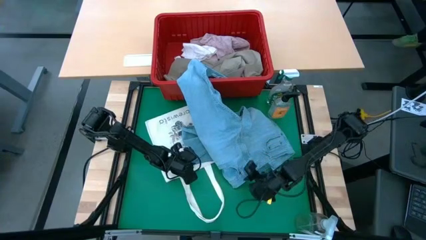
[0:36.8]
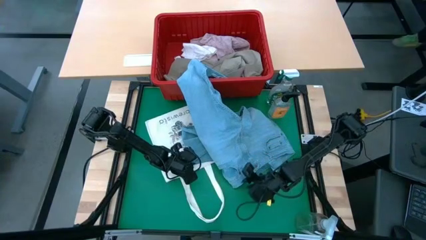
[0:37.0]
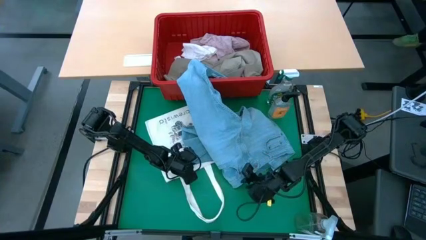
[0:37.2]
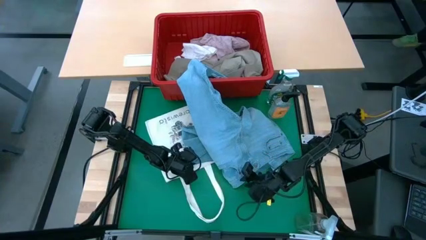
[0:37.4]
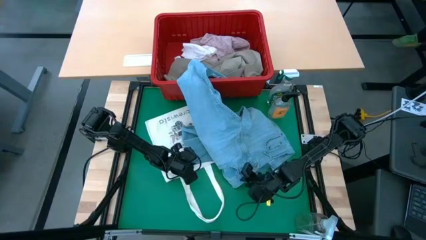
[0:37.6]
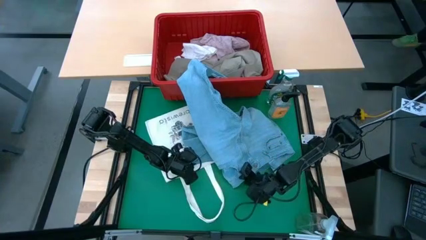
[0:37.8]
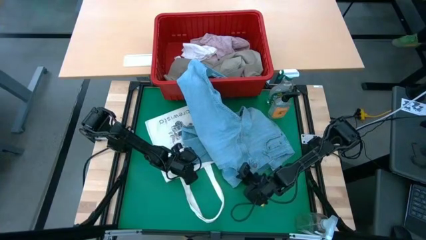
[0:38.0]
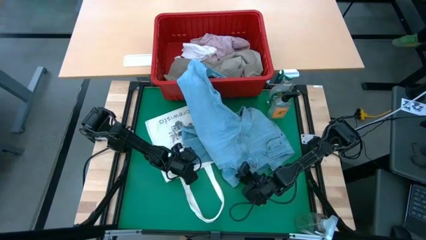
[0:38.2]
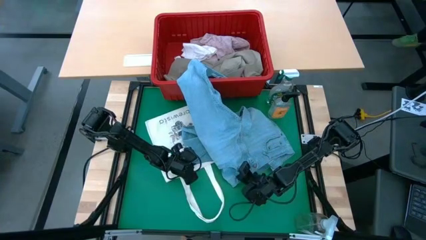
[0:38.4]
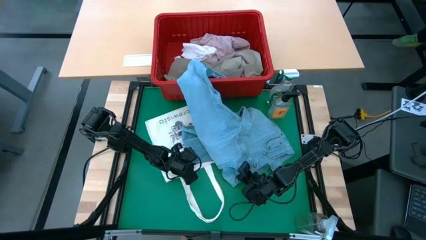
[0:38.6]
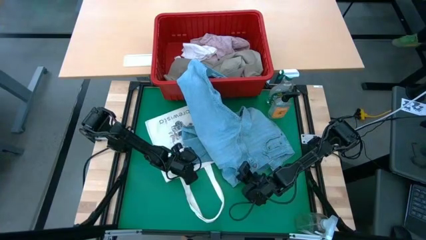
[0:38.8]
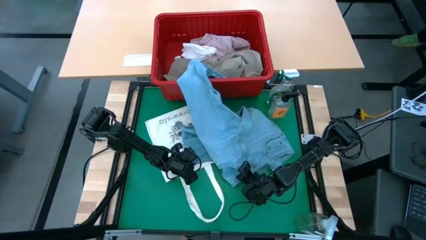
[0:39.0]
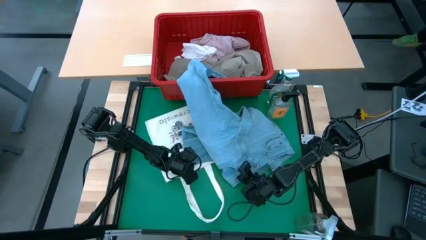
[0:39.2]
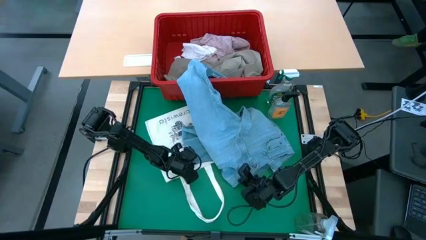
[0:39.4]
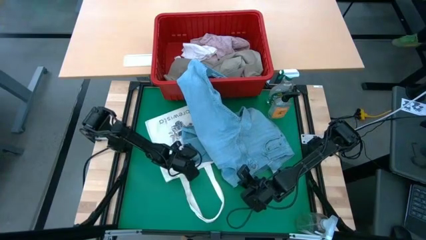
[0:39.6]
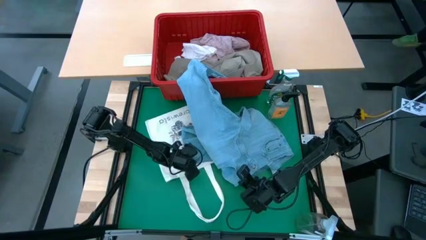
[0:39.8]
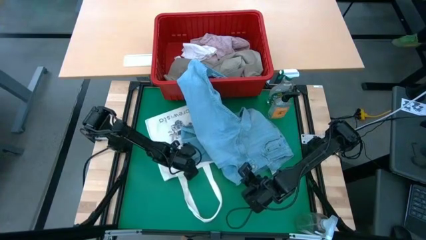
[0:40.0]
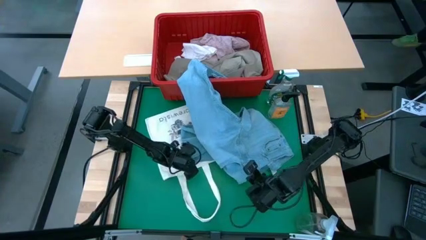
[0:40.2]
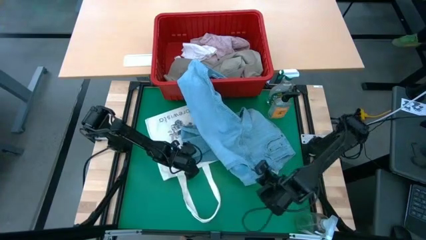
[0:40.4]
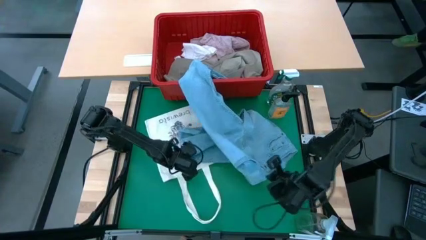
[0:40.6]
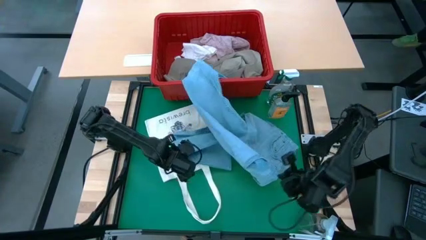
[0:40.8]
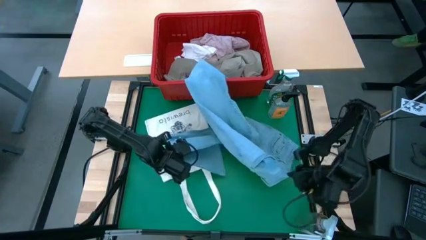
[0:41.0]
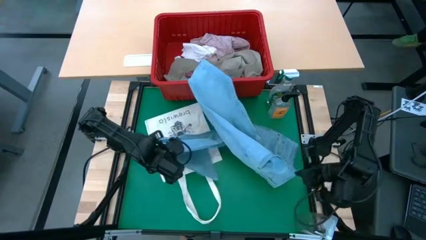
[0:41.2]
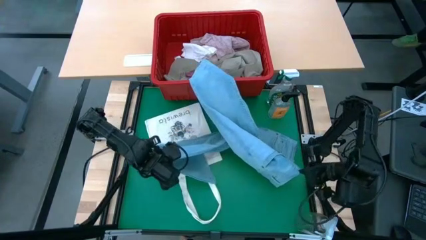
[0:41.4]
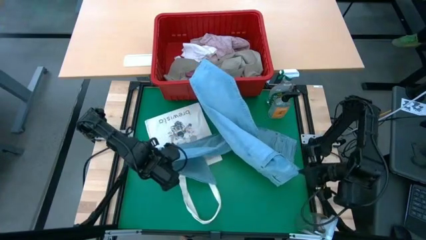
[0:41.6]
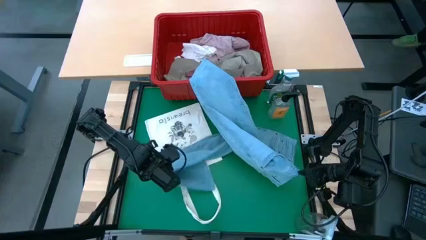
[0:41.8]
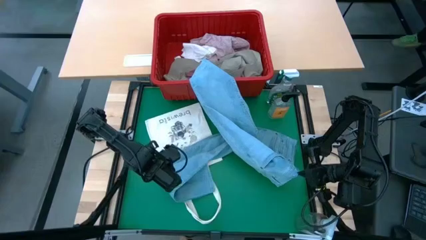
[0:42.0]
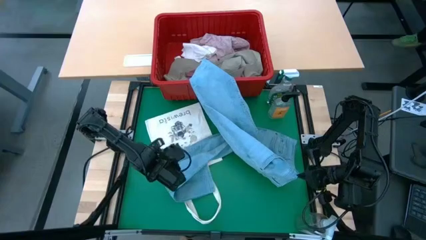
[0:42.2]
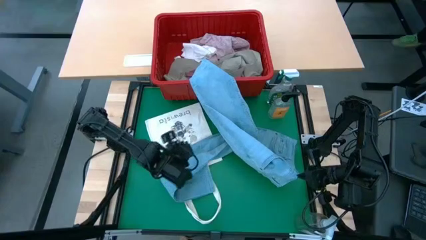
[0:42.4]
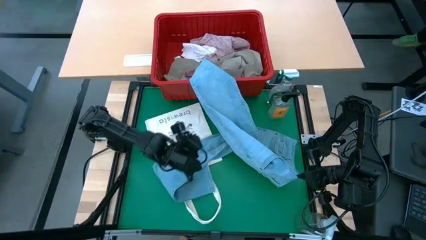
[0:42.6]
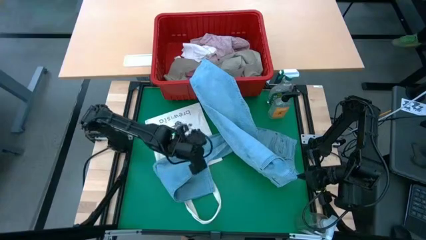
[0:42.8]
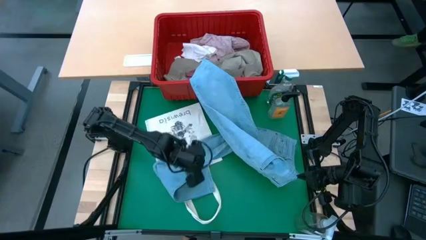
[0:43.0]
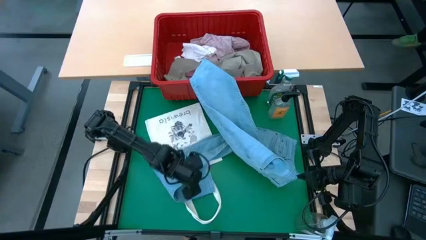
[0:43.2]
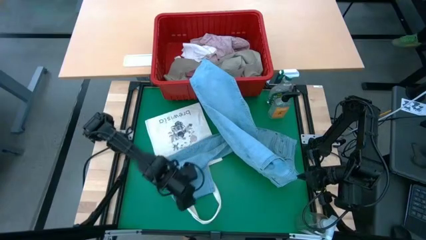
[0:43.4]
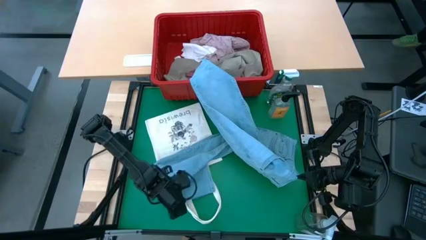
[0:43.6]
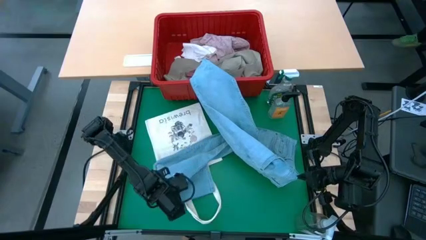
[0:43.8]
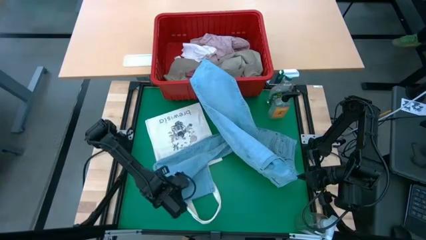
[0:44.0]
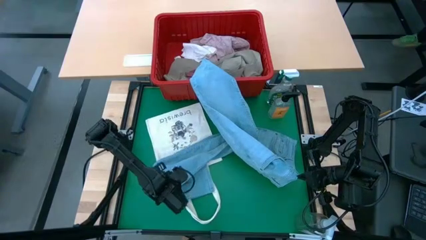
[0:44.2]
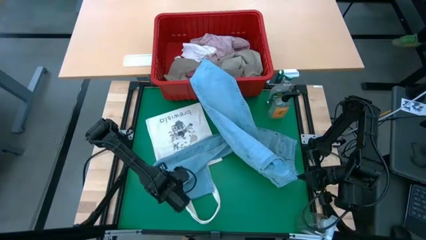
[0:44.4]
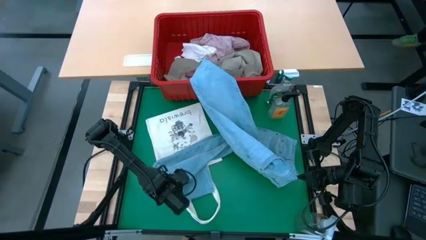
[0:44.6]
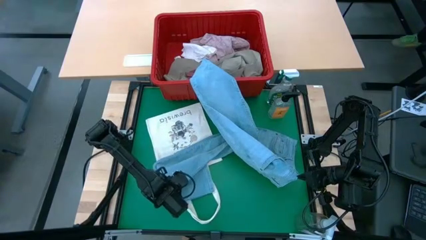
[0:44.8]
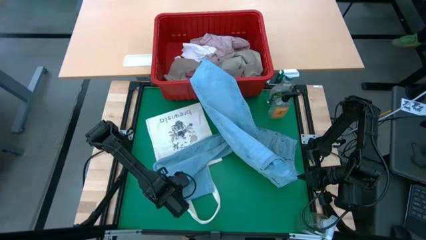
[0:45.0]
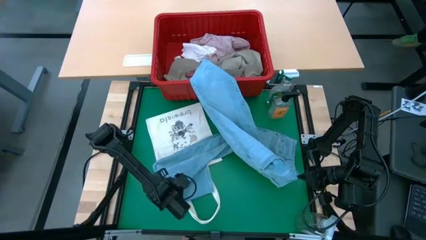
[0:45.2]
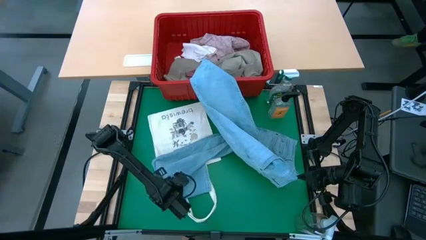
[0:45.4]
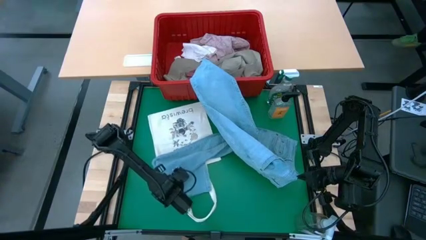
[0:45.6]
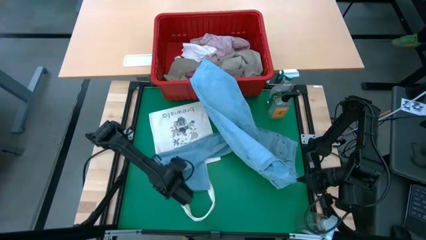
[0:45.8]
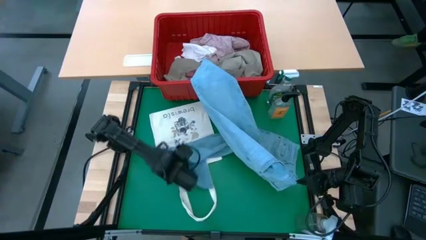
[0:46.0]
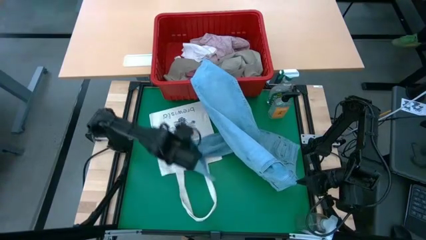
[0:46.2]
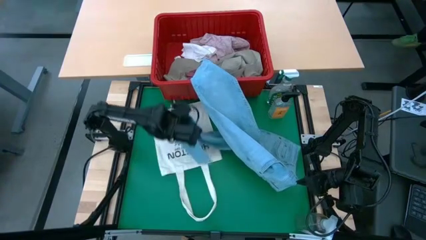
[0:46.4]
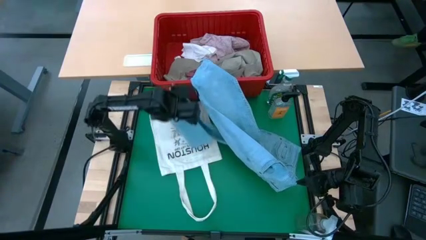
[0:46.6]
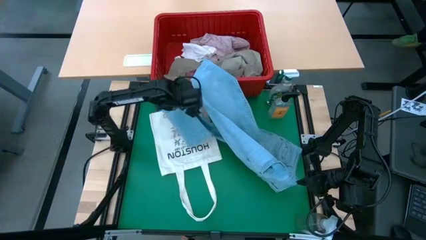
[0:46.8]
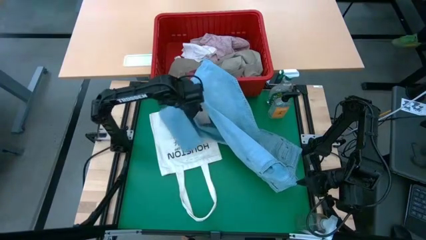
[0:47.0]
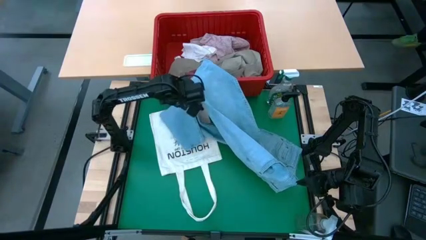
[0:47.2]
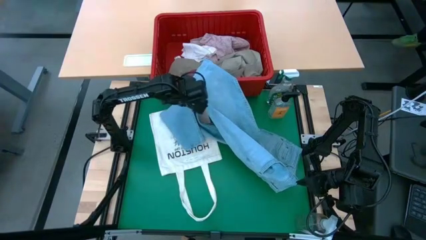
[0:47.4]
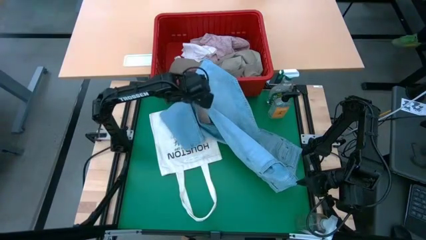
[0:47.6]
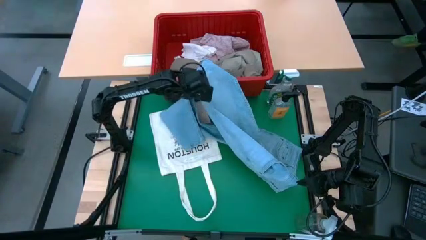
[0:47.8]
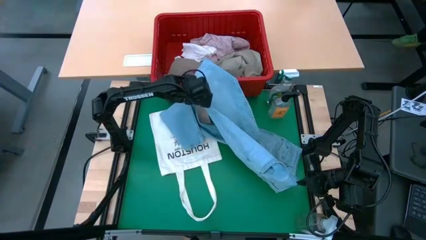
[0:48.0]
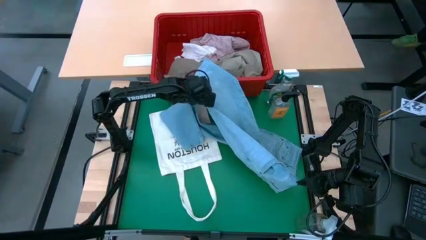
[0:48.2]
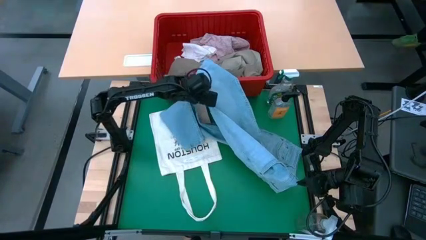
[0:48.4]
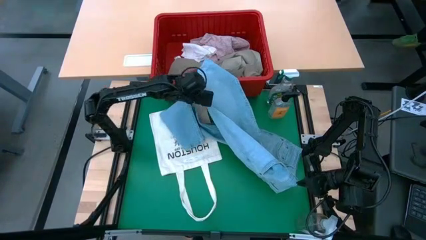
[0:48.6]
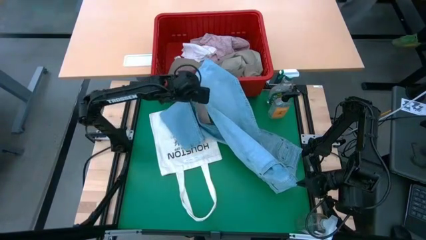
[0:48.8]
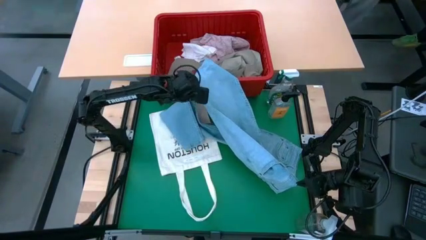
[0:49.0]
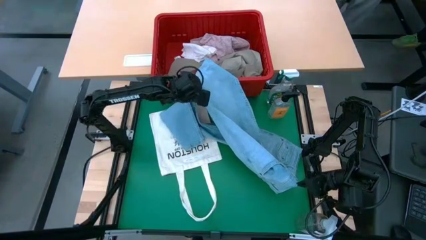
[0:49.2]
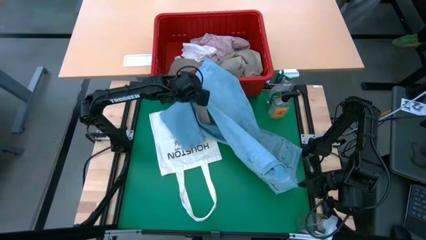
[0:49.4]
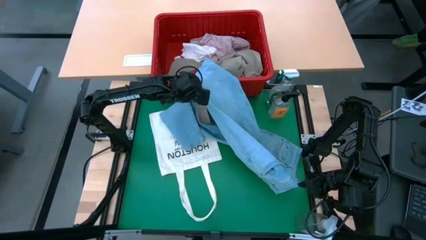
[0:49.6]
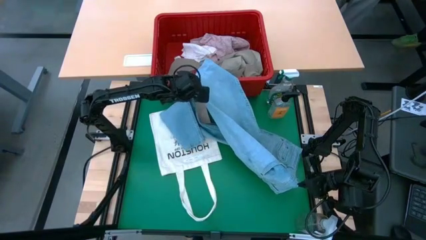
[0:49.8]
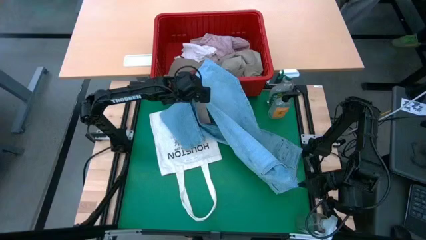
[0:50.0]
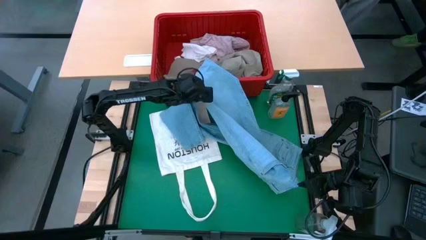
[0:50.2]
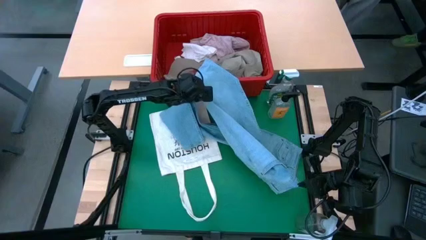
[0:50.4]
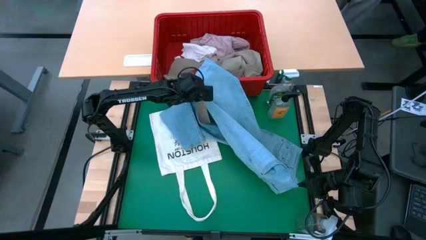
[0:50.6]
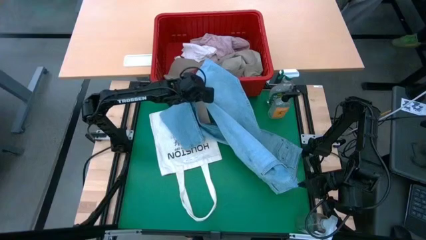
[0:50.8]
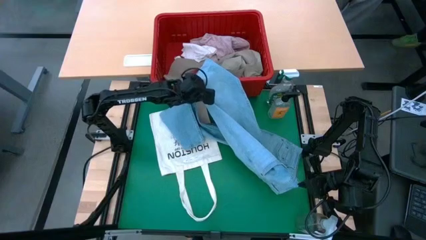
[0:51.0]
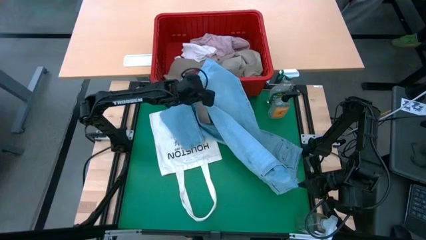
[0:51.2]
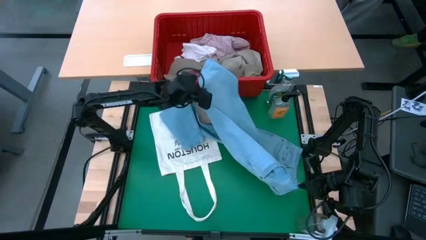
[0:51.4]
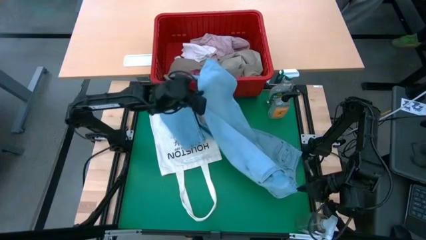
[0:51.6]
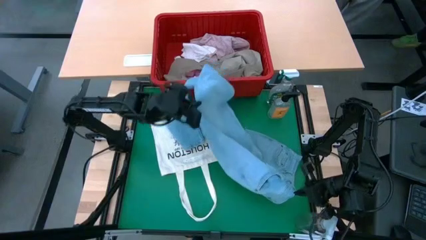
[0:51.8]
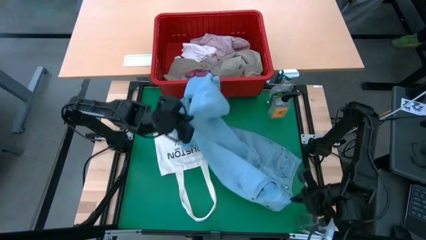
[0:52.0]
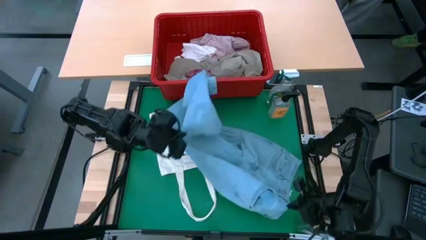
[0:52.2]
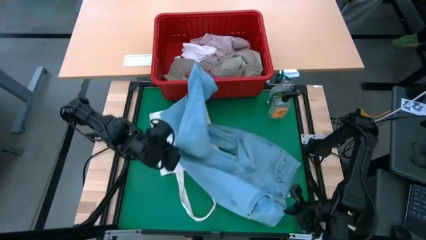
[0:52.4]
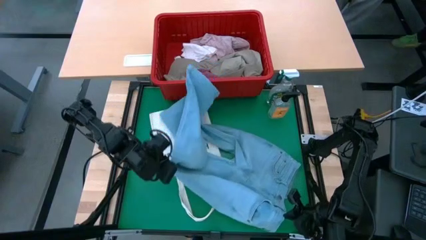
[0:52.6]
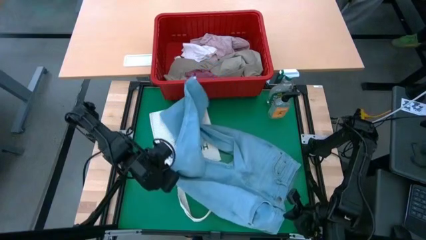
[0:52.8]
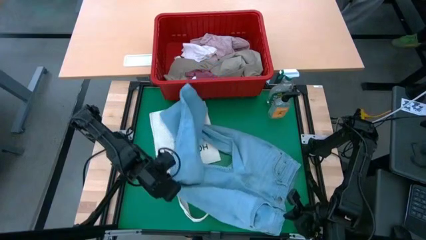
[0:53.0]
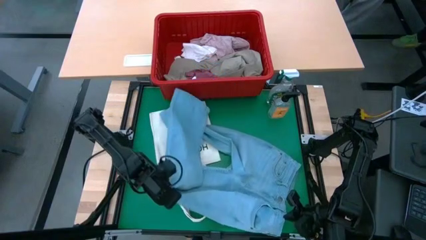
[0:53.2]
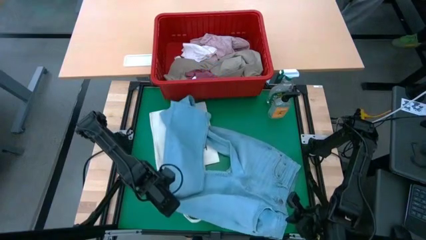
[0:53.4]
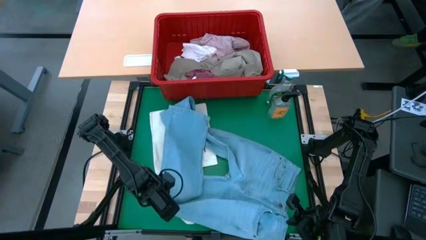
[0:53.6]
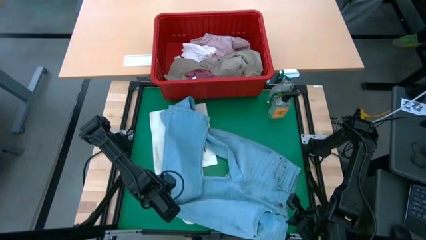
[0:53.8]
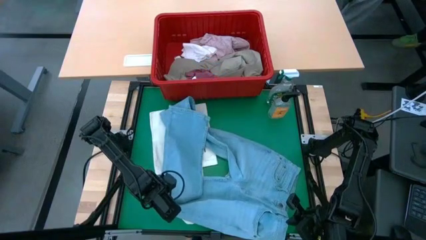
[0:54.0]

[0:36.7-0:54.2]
Task: Fold laundry
Remove the light blue pants from the red bin
